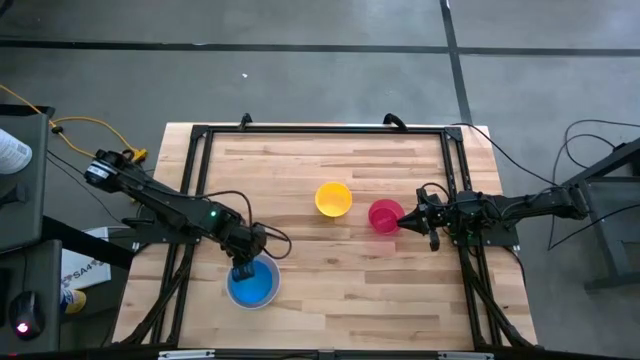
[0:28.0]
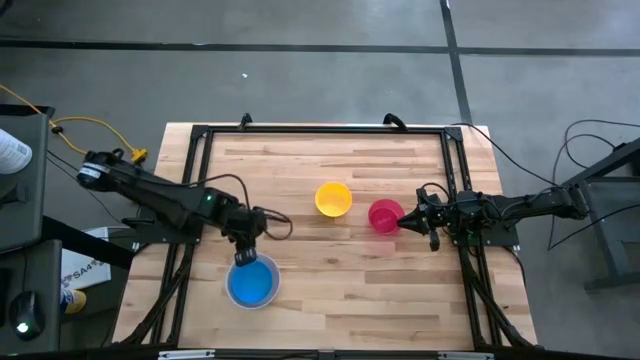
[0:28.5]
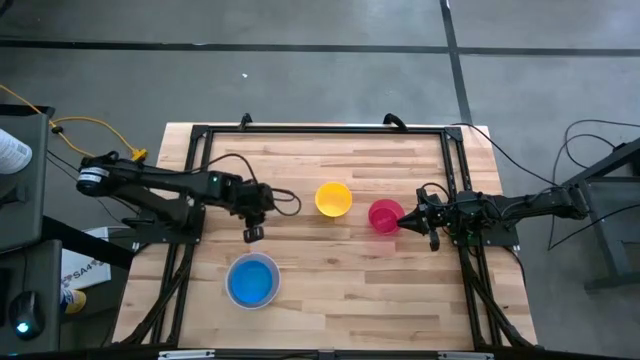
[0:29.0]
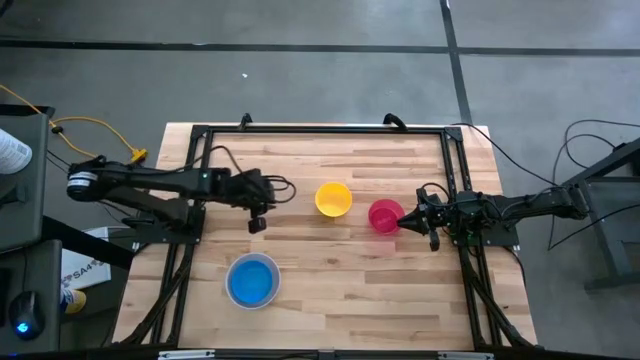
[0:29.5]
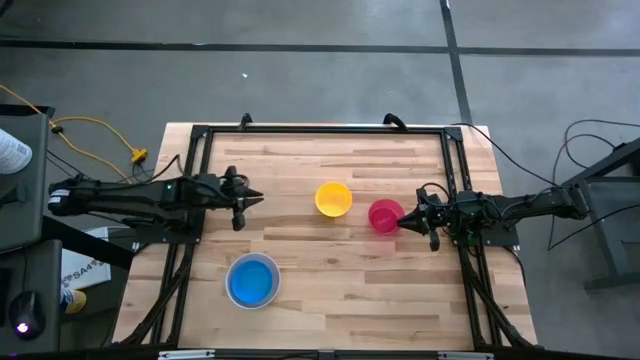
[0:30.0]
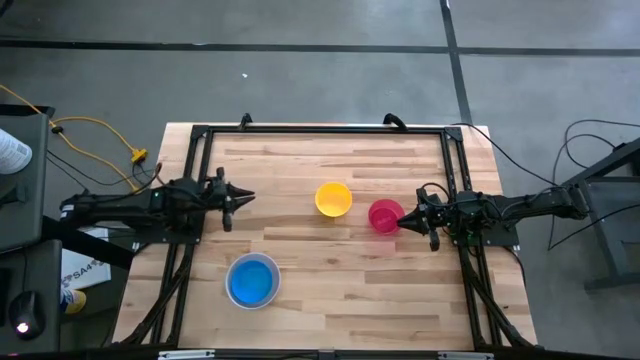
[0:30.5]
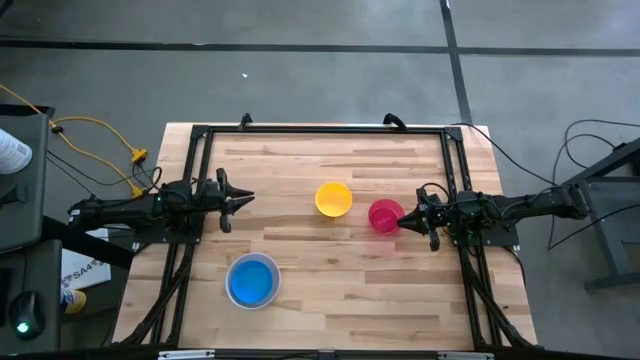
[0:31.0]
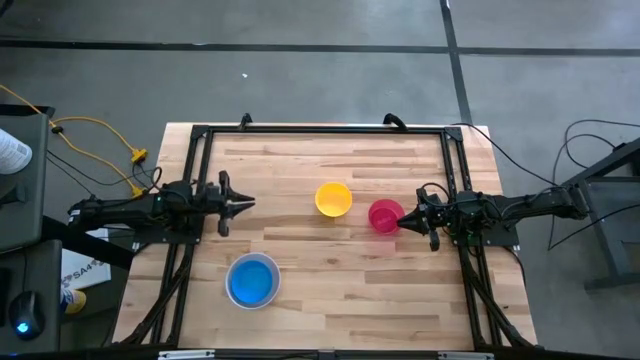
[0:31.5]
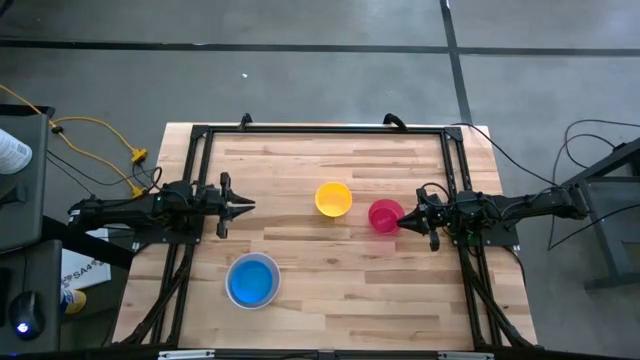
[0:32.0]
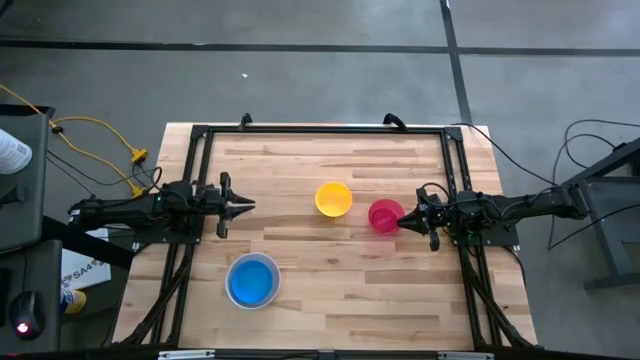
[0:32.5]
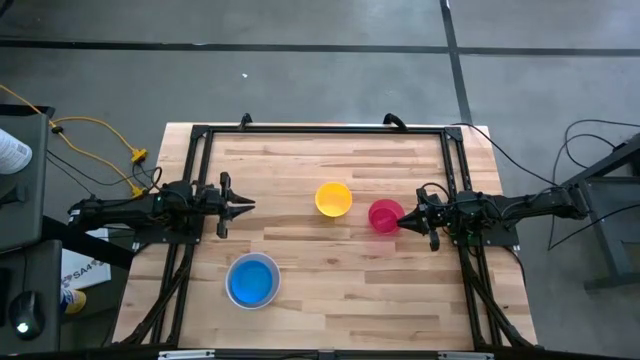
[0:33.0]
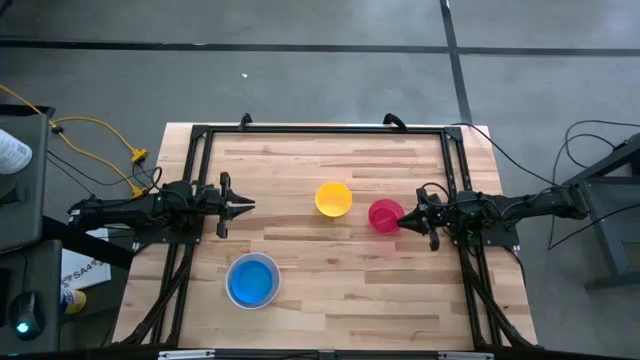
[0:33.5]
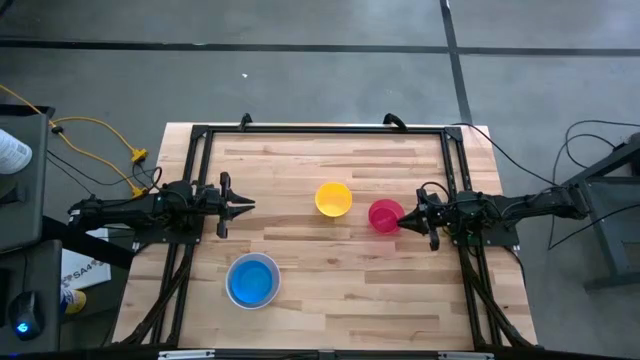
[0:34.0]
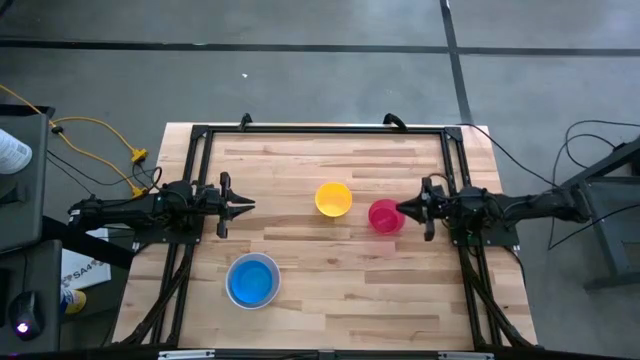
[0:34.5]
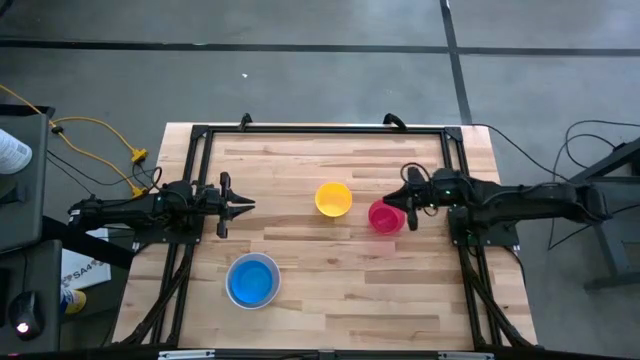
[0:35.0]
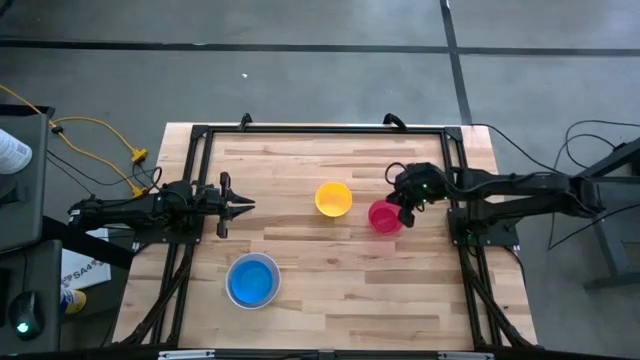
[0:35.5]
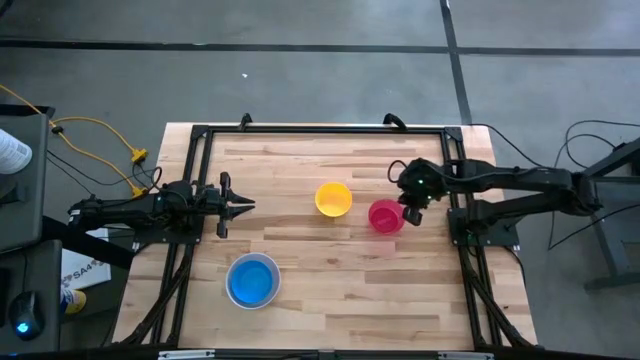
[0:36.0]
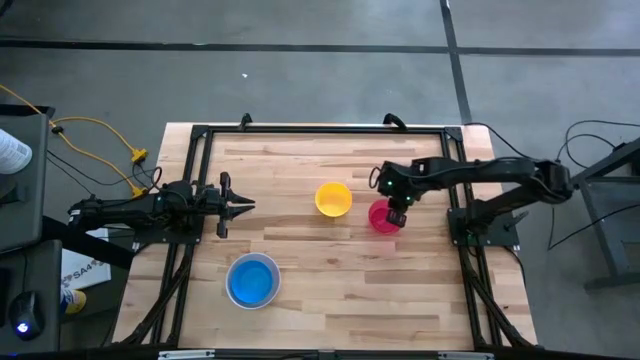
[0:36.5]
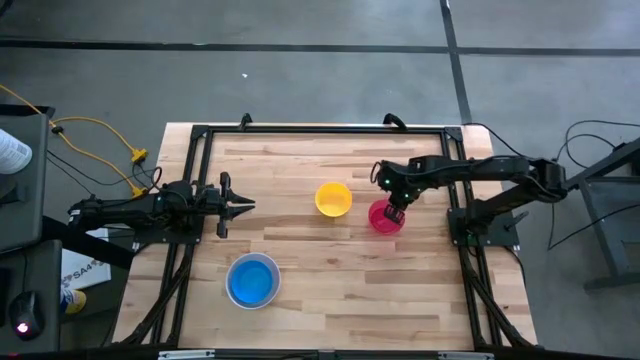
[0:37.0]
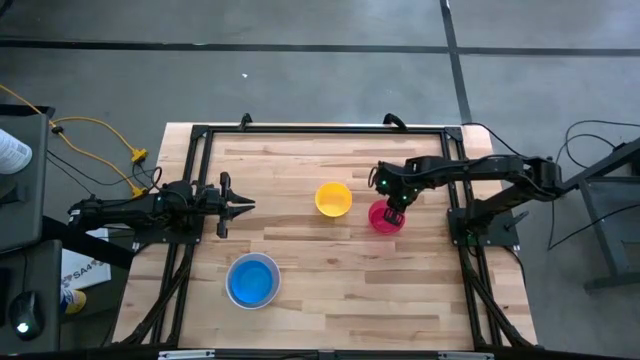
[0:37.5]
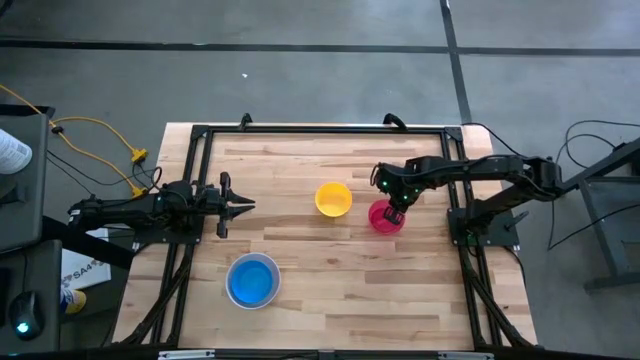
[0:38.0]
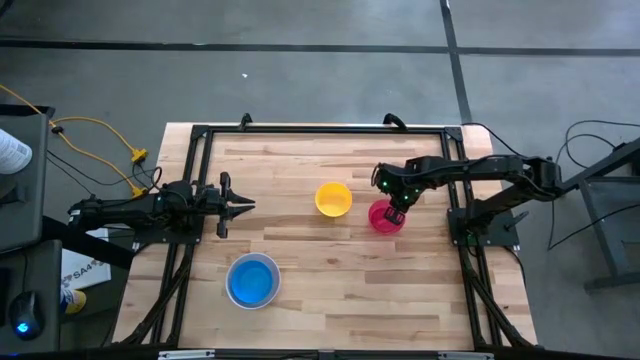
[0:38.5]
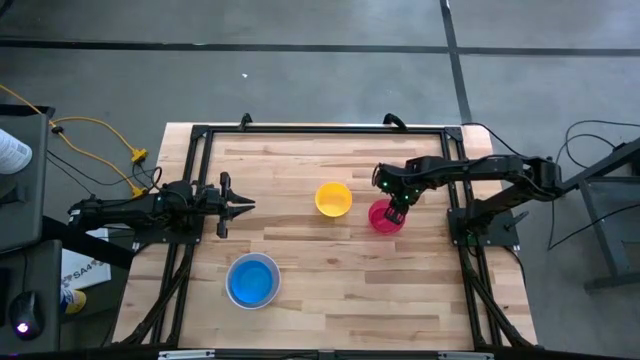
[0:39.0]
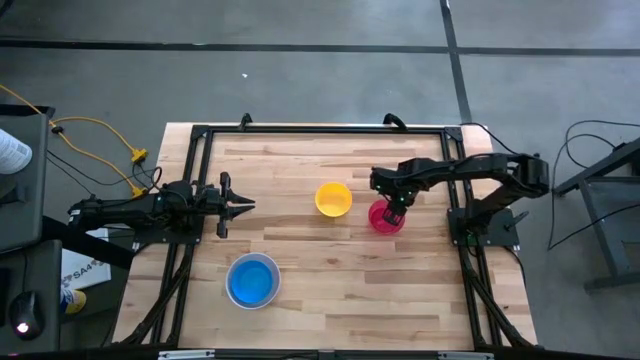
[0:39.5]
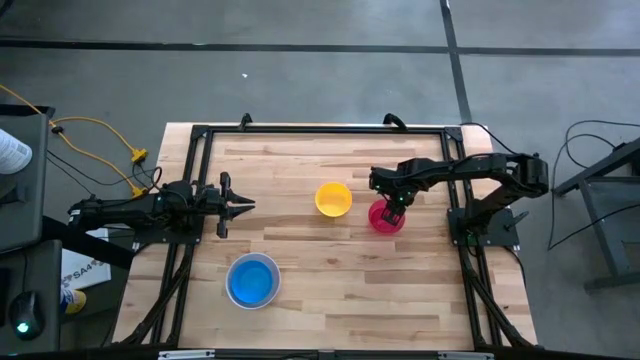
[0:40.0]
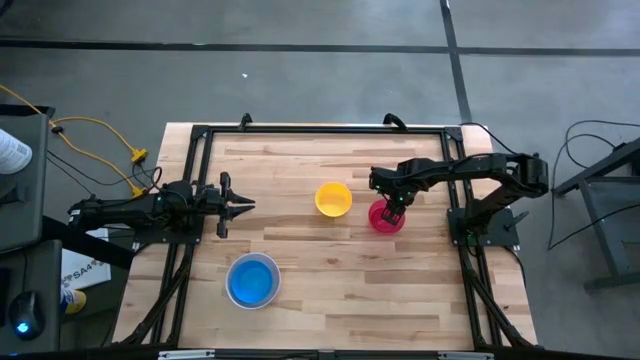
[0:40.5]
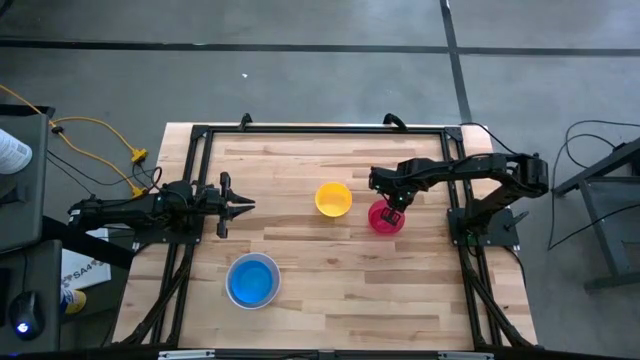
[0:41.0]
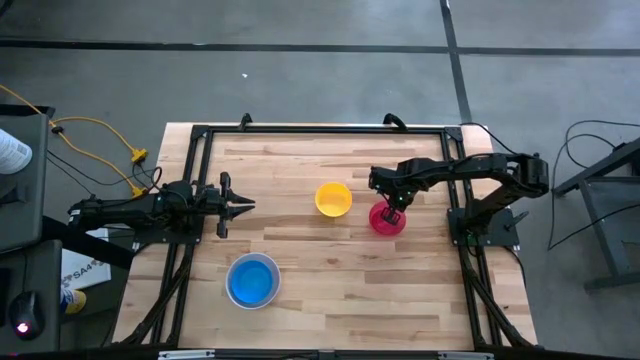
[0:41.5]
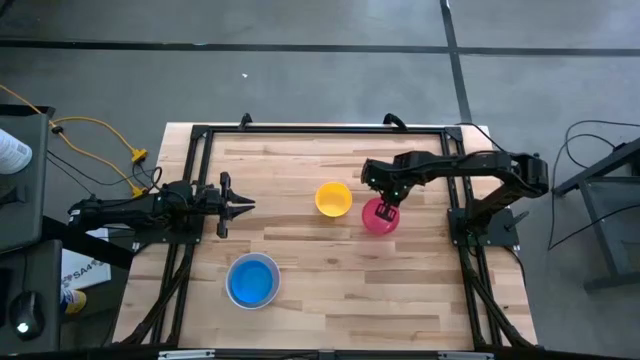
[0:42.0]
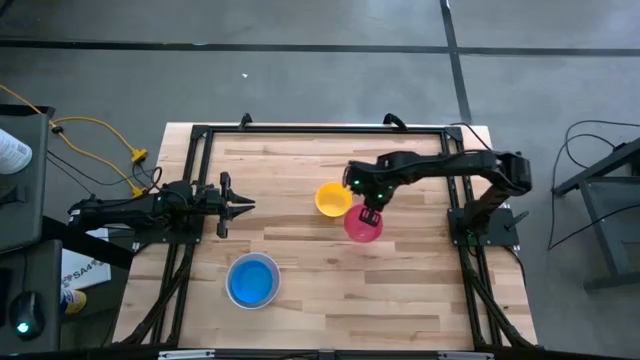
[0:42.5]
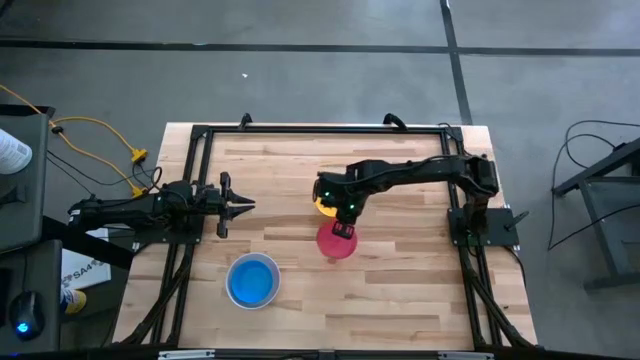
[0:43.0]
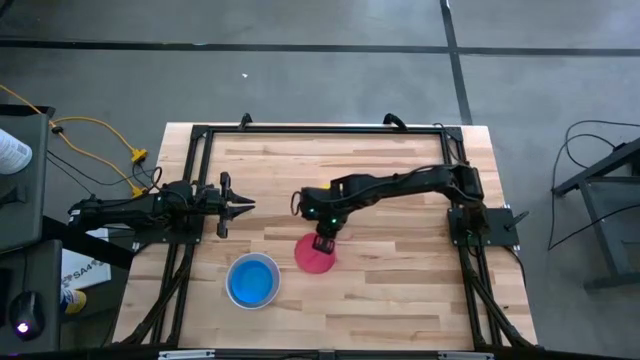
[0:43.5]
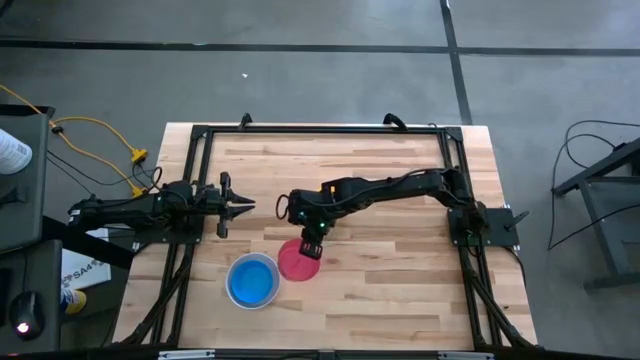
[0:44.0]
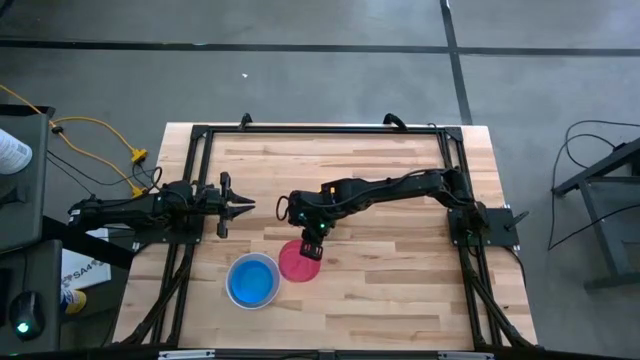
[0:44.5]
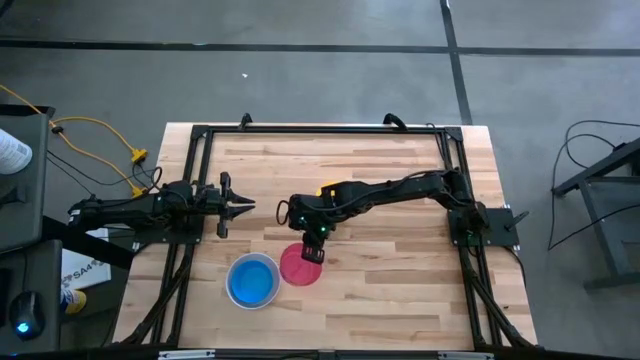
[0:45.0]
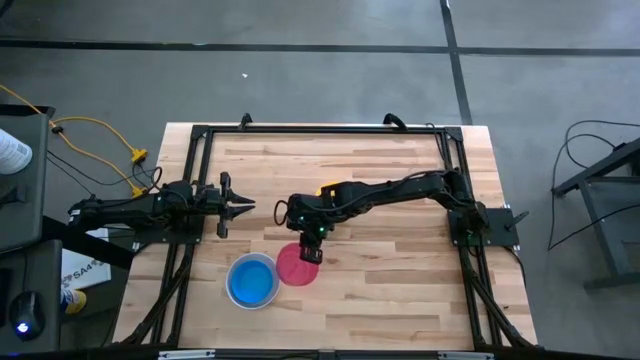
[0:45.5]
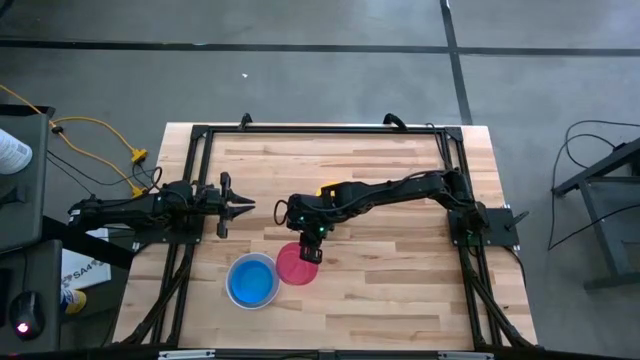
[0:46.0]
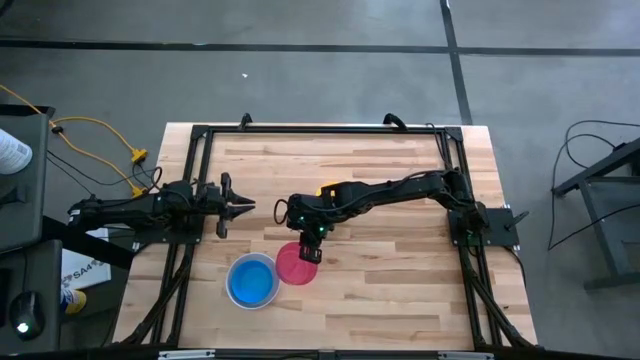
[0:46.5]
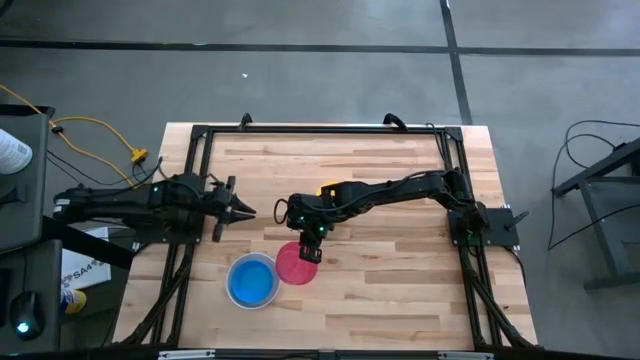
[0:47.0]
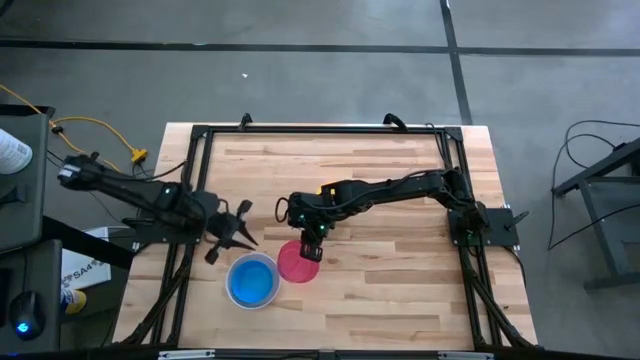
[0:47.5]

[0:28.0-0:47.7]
Stack the red bowl on the blue bowl
